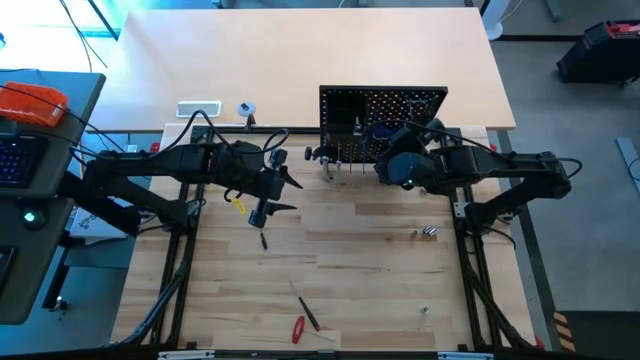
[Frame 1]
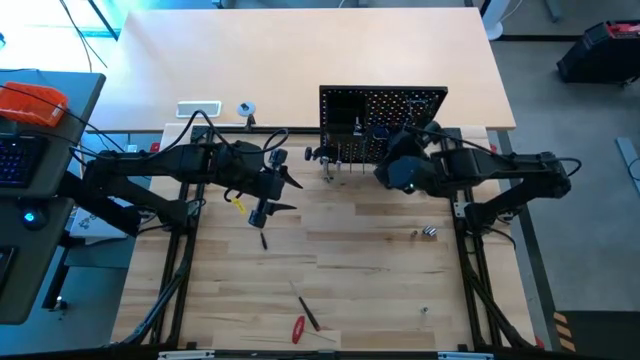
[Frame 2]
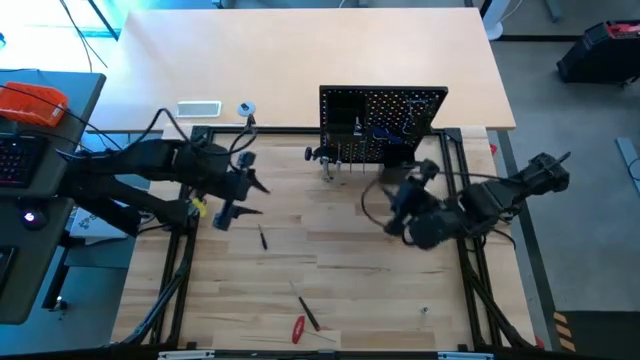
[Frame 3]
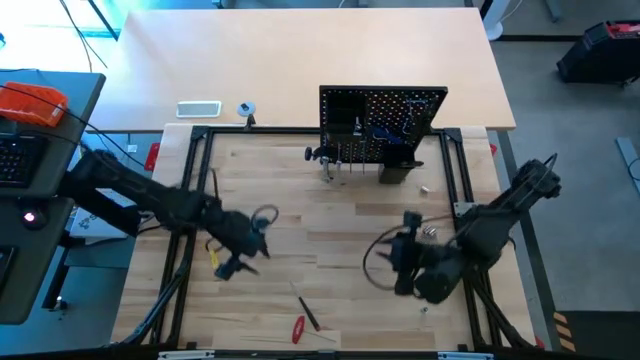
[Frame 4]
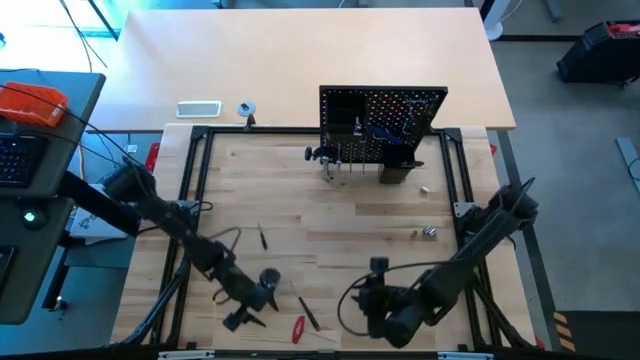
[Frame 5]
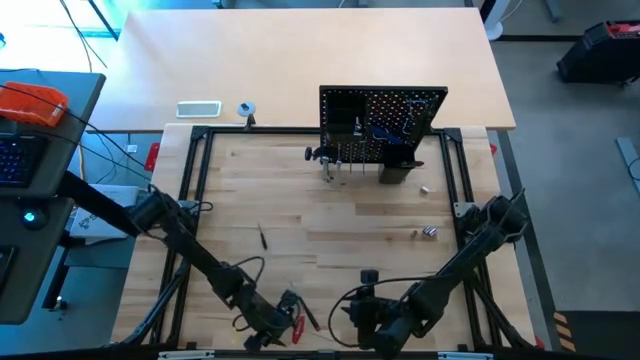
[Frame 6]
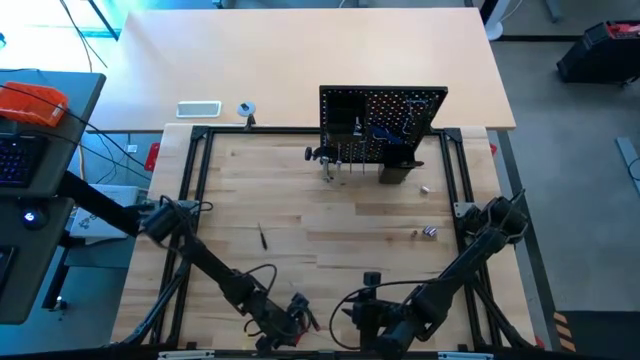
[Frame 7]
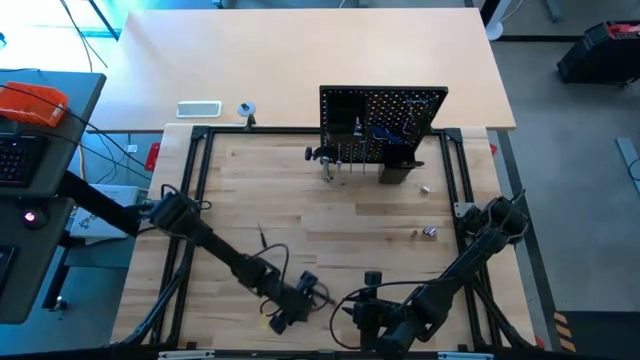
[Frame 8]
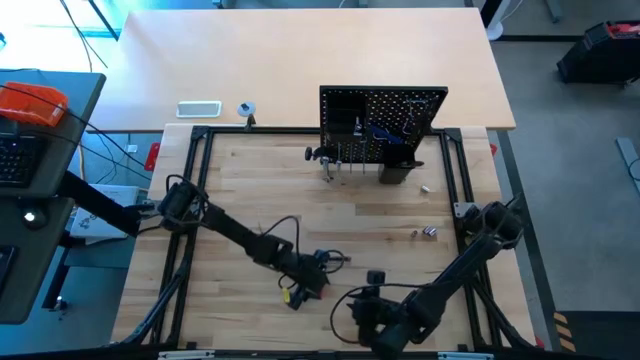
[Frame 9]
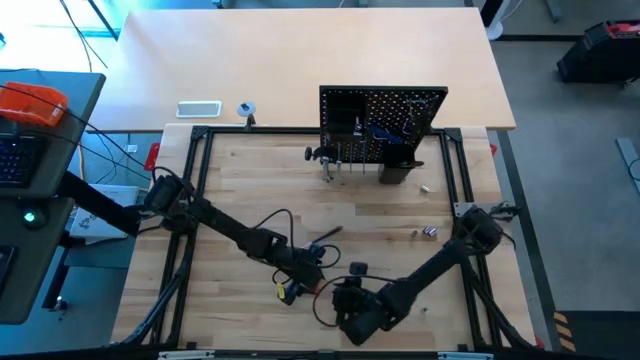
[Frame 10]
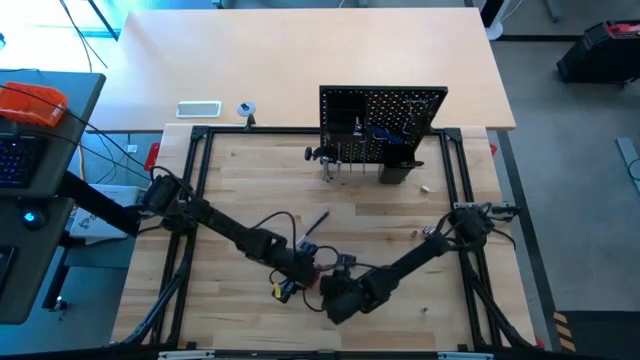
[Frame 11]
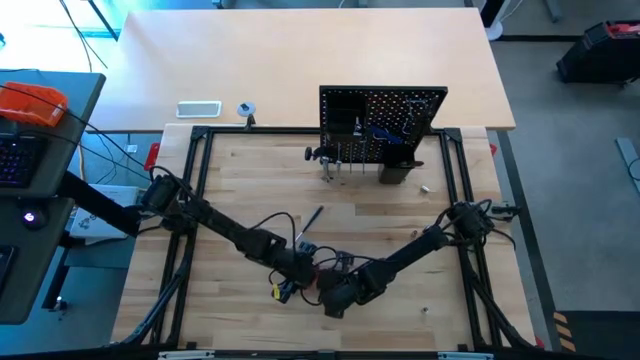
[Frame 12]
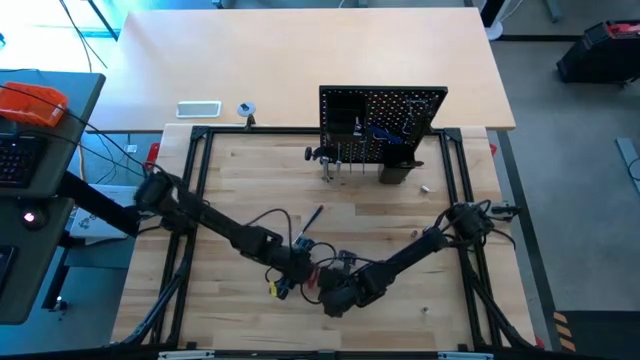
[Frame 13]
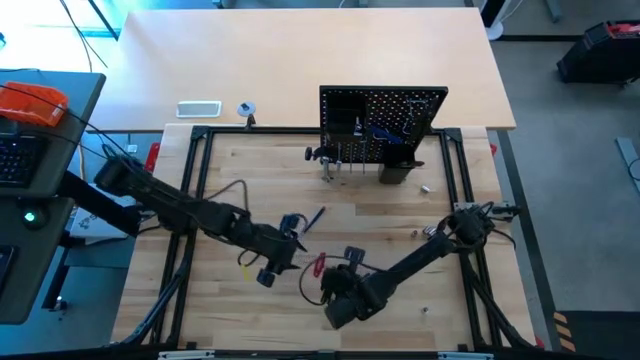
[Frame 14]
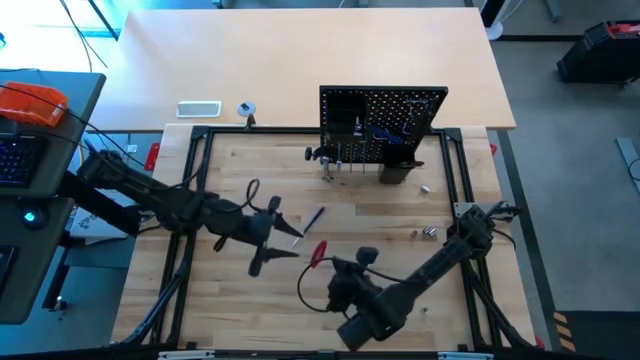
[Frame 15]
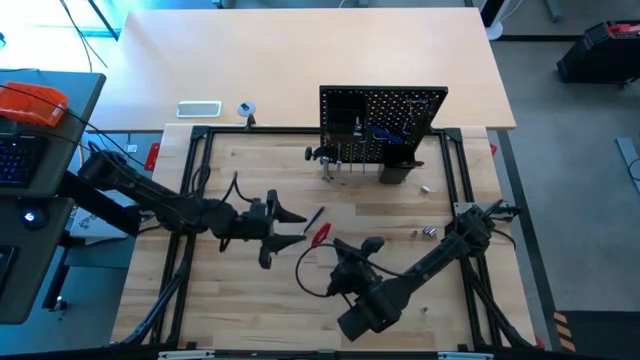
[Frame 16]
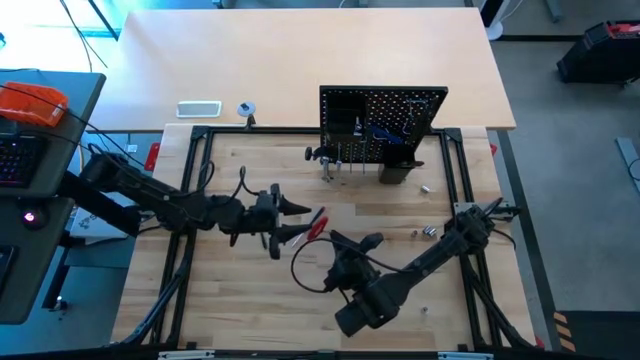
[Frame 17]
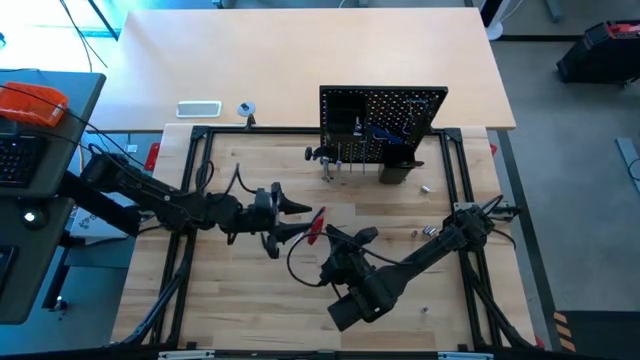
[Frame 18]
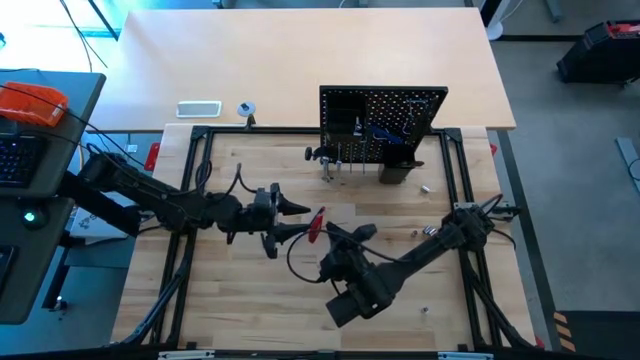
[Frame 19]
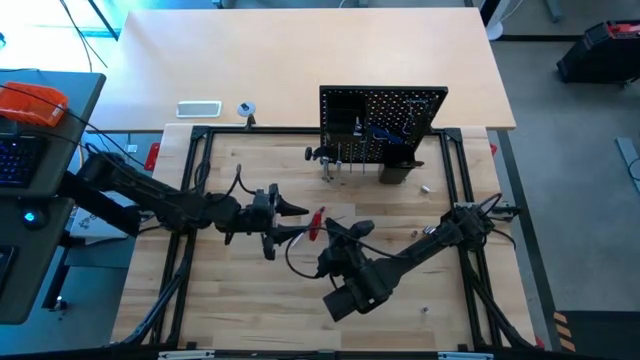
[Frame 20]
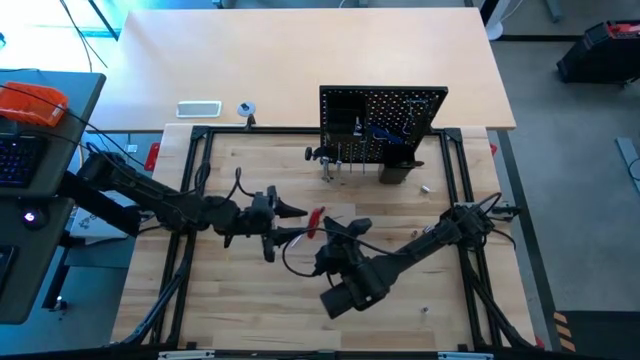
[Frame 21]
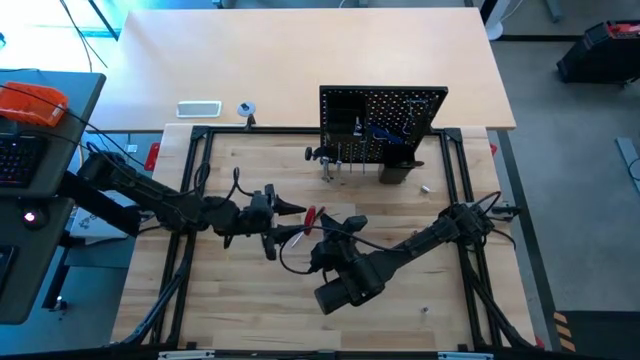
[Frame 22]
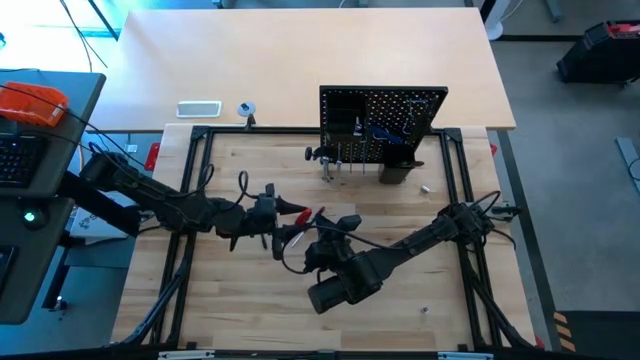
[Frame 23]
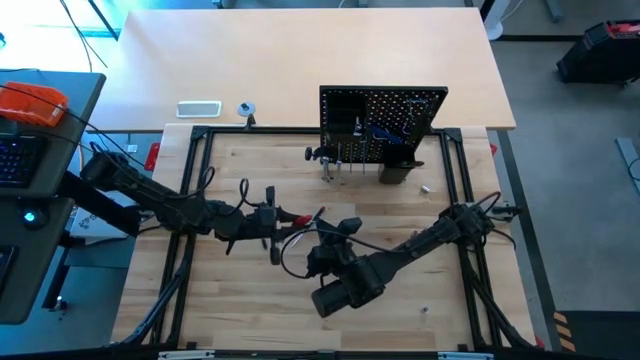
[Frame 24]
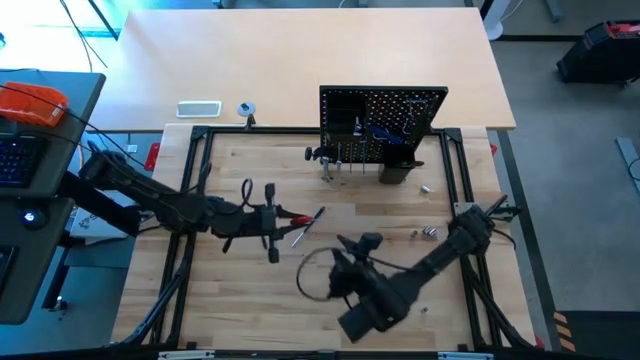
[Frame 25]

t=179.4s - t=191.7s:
Task: Hang tools onto peg board
Hang the red T-handle hex key onto the pegboard

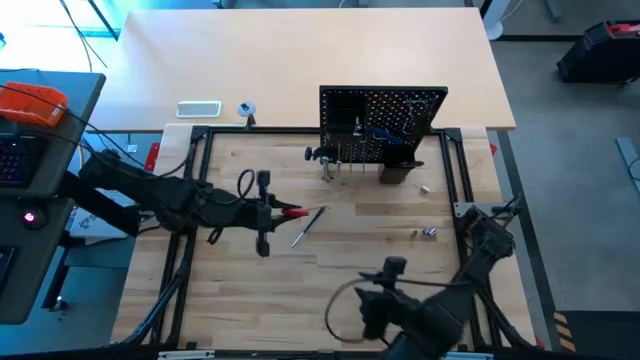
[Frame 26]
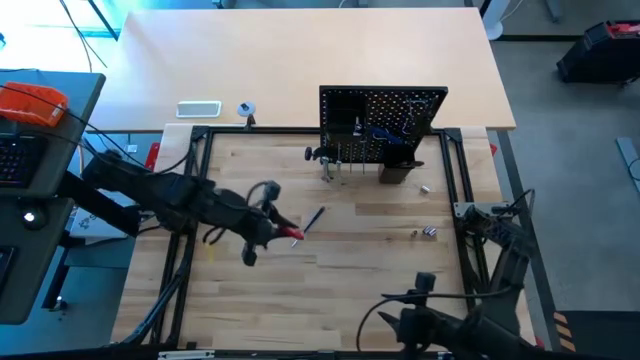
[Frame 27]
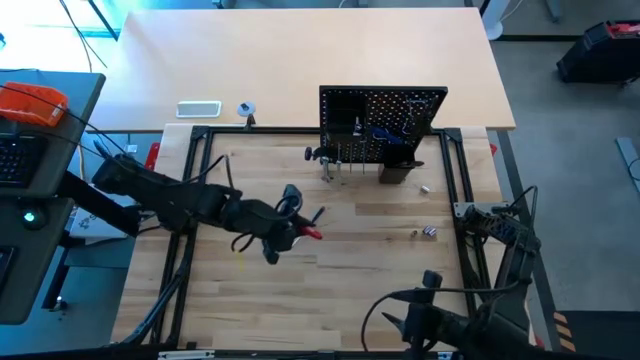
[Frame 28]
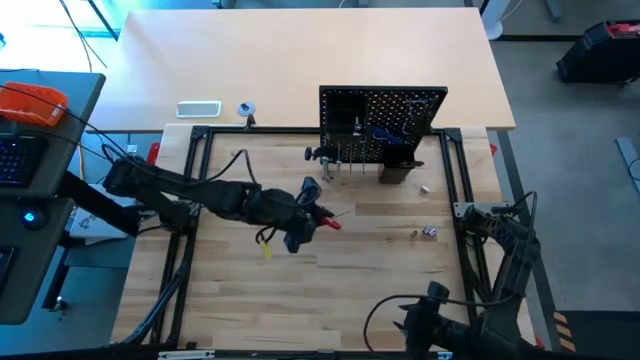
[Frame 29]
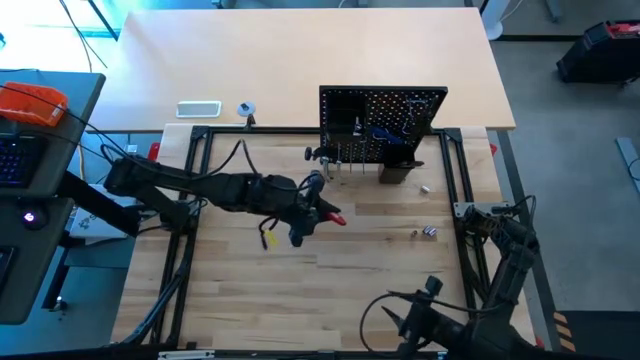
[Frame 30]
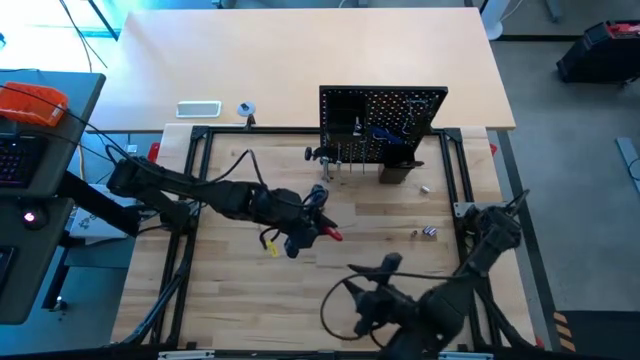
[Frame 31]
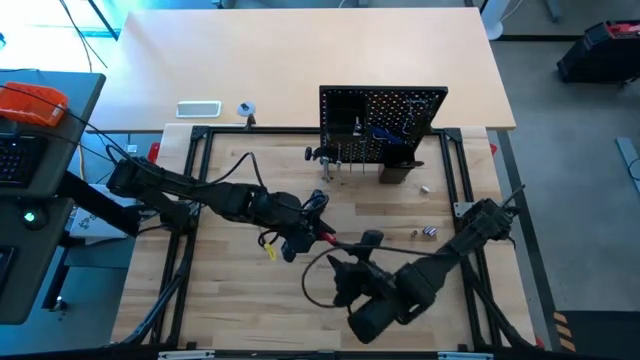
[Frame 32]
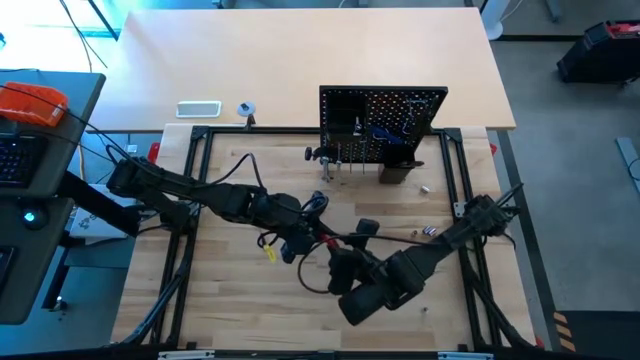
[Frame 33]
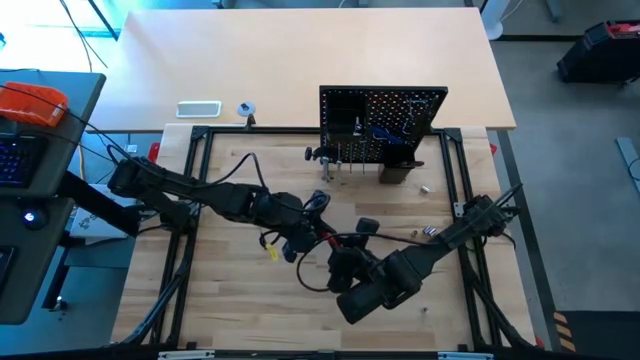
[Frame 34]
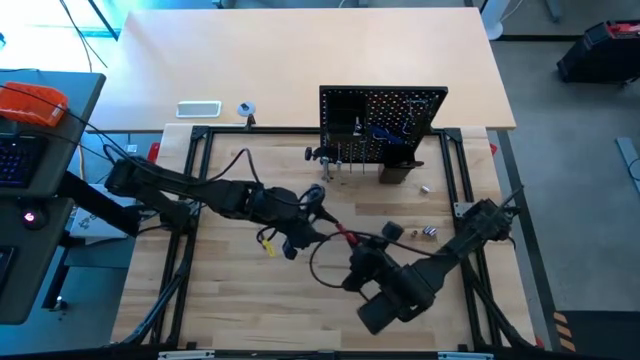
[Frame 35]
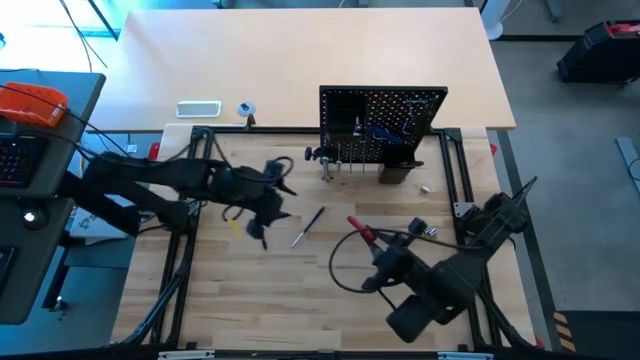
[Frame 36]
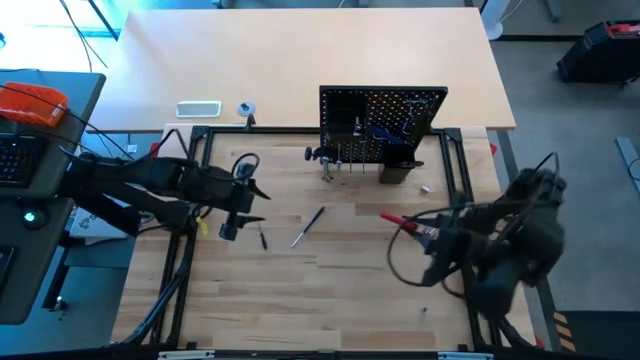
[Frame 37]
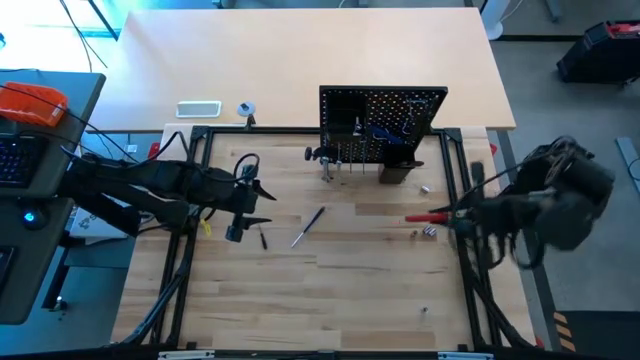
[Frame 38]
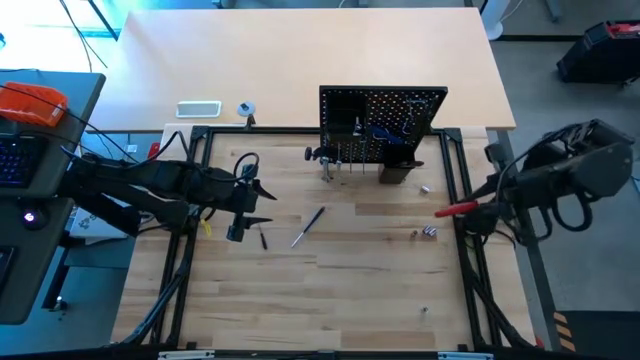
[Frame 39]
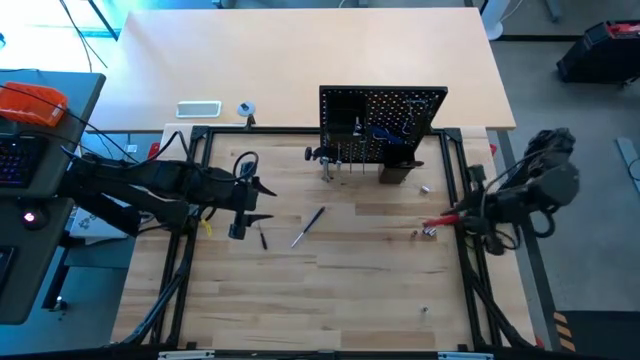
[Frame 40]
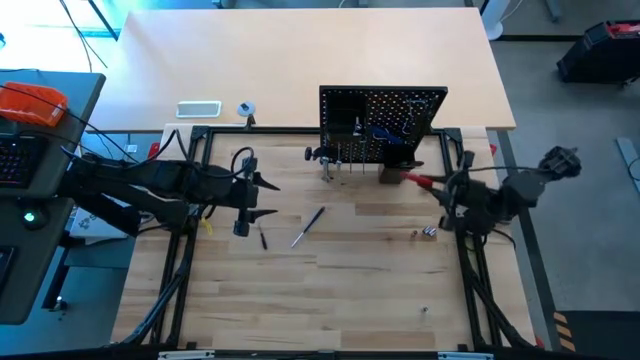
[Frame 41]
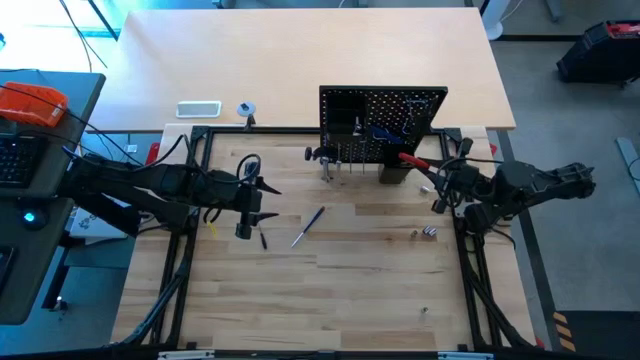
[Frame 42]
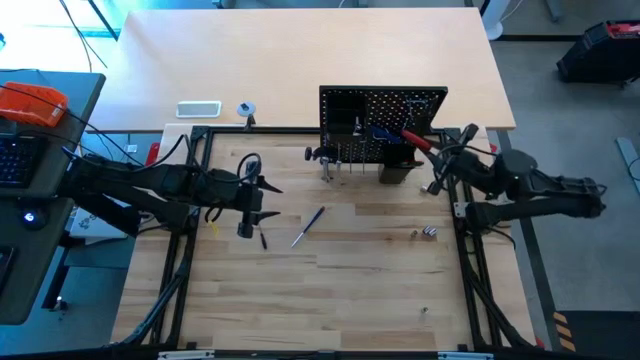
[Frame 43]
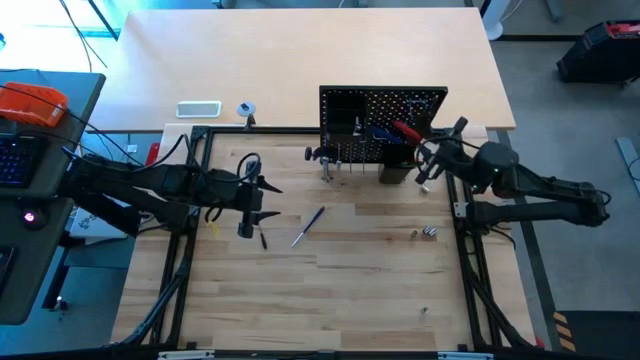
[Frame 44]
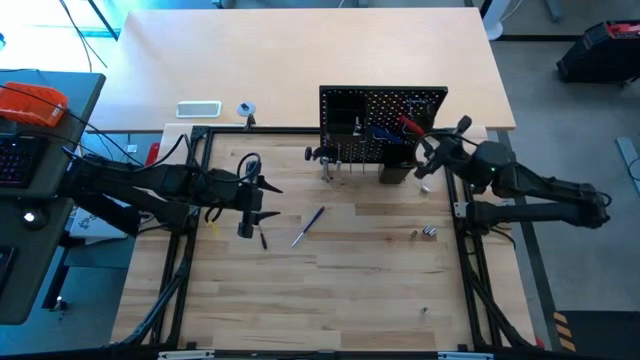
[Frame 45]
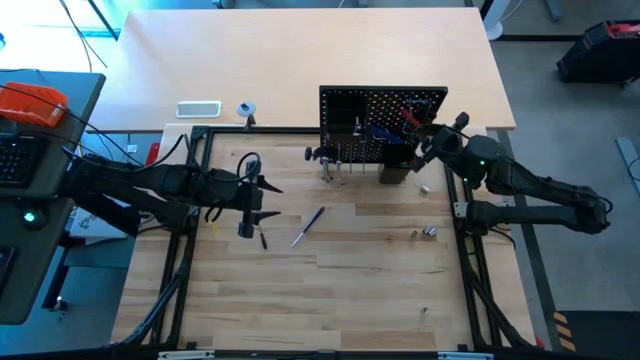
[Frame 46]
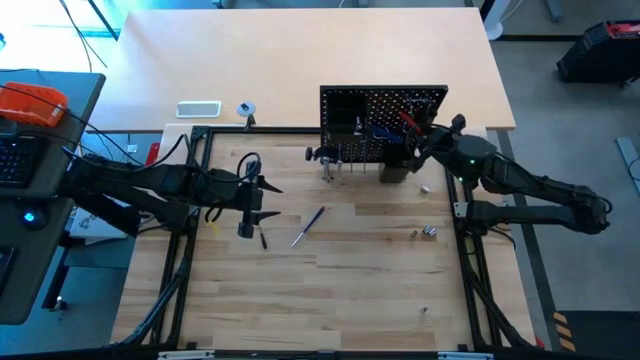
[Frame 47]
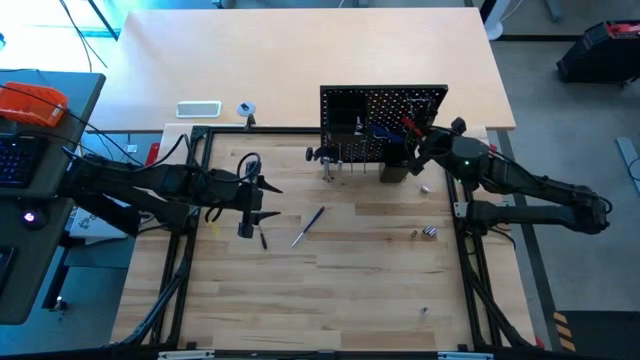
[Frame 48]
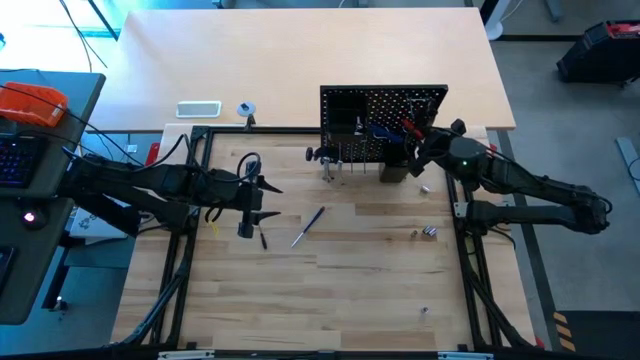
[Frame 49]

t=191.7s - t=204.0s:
Hang the red T-handle hex key onto the pegboard
